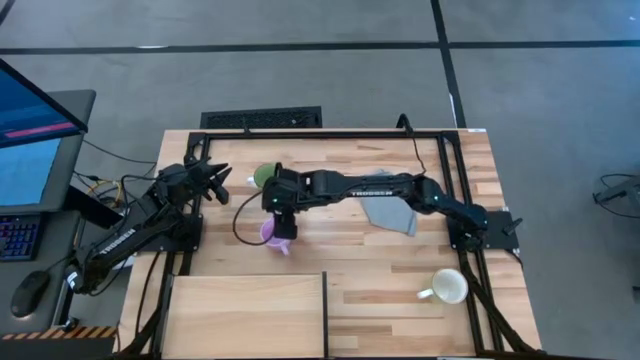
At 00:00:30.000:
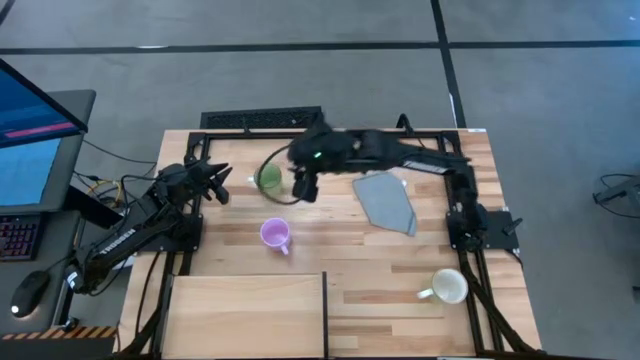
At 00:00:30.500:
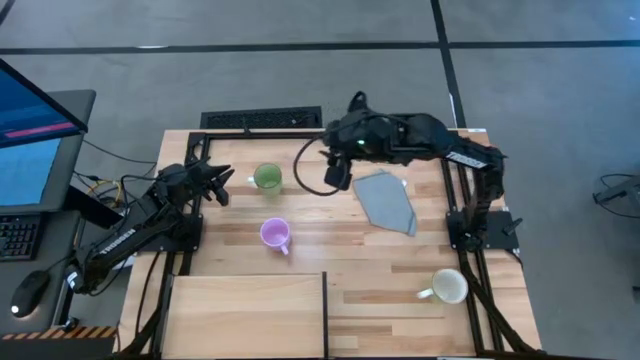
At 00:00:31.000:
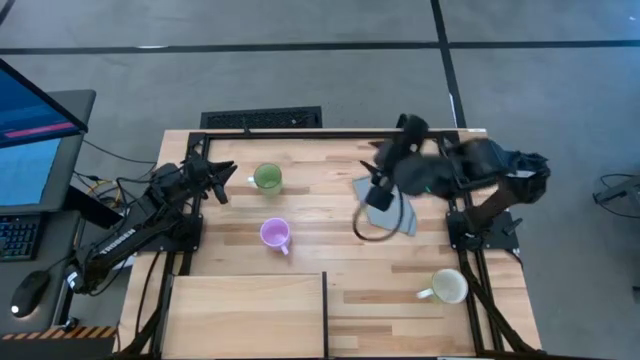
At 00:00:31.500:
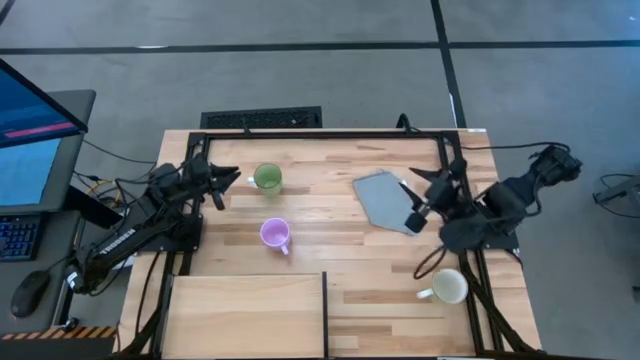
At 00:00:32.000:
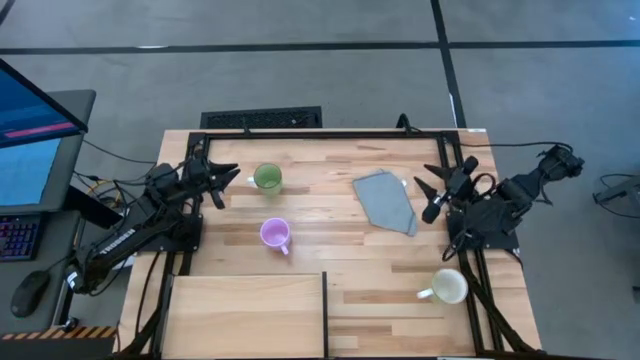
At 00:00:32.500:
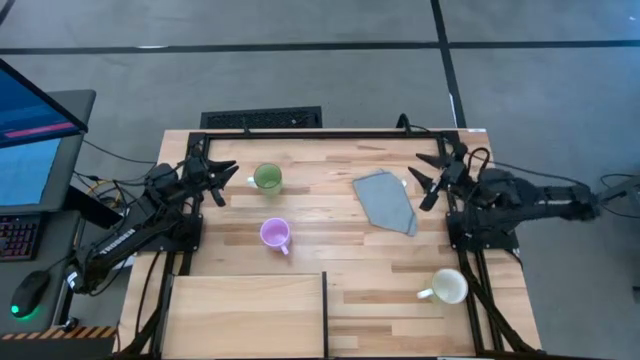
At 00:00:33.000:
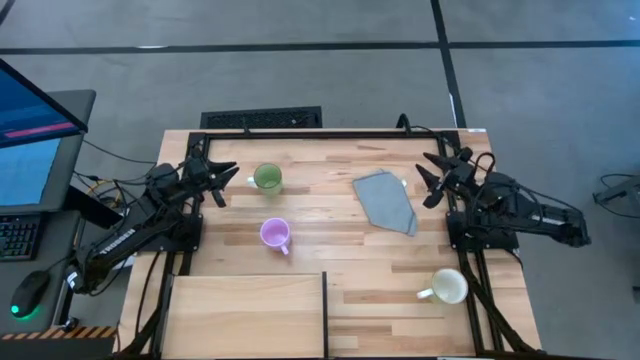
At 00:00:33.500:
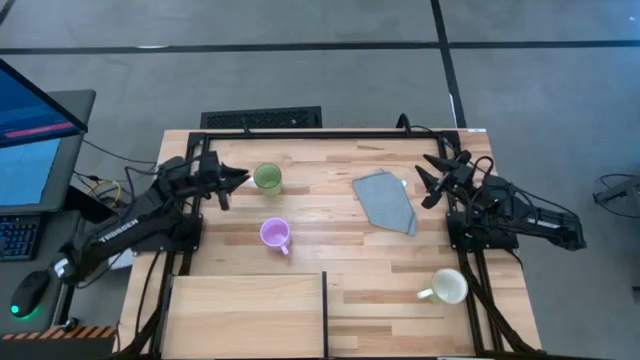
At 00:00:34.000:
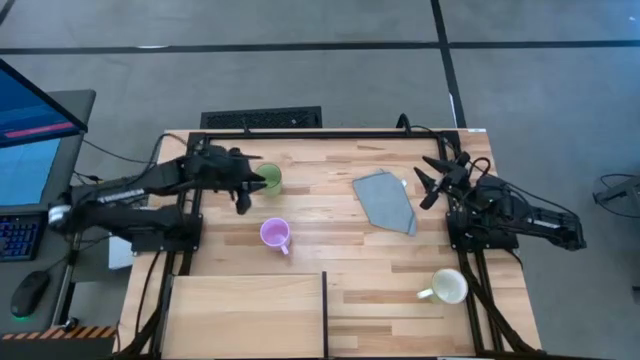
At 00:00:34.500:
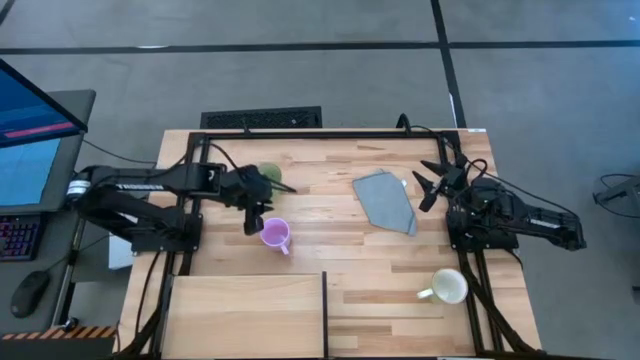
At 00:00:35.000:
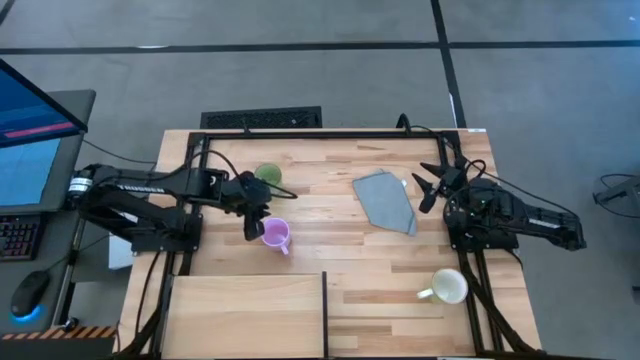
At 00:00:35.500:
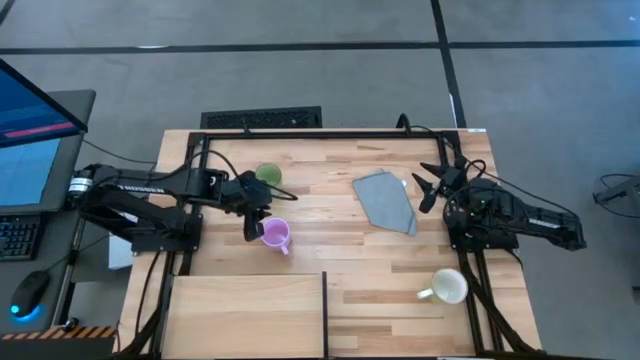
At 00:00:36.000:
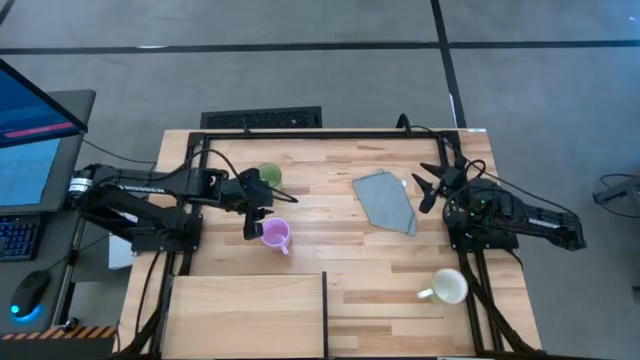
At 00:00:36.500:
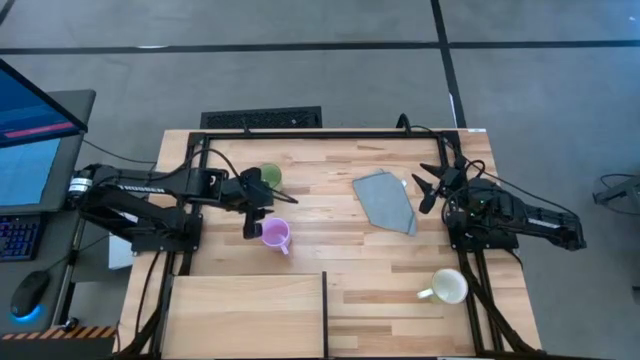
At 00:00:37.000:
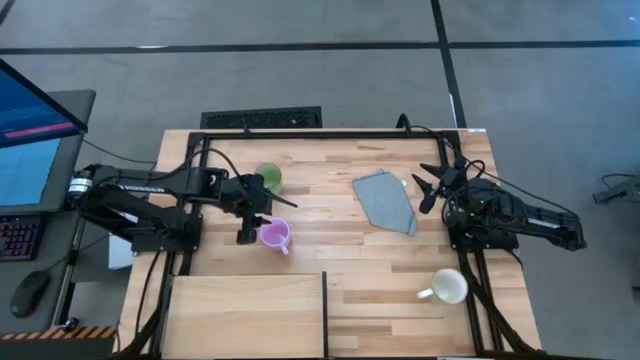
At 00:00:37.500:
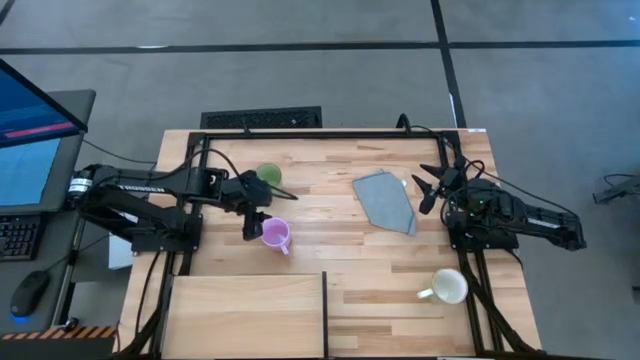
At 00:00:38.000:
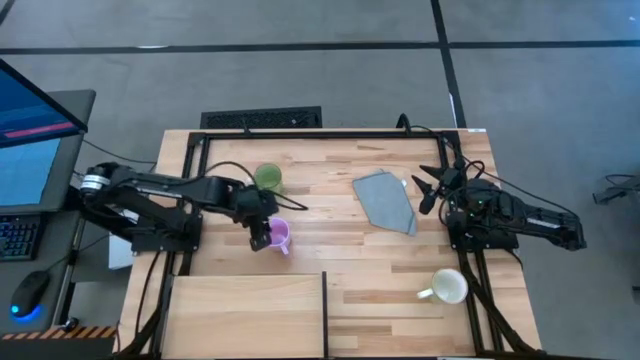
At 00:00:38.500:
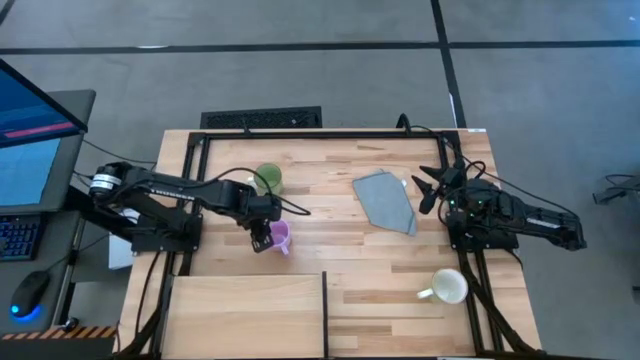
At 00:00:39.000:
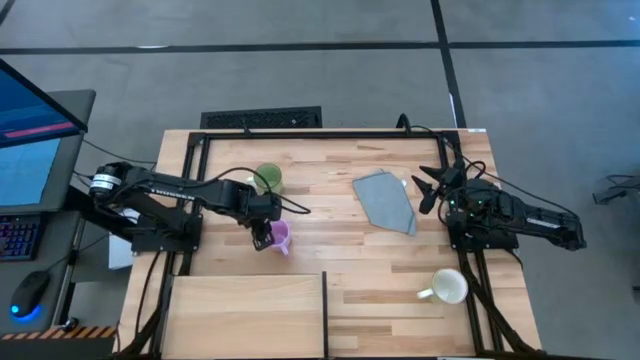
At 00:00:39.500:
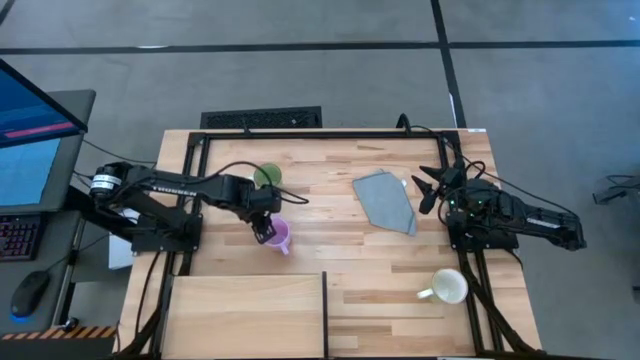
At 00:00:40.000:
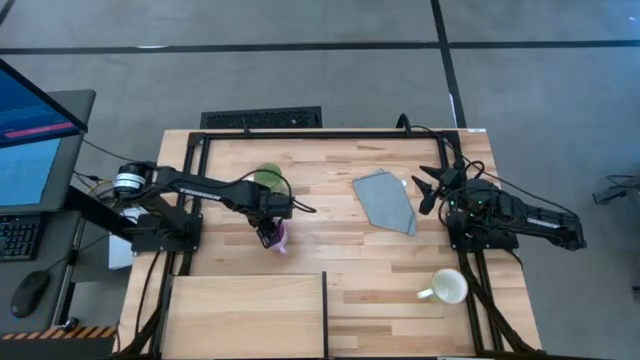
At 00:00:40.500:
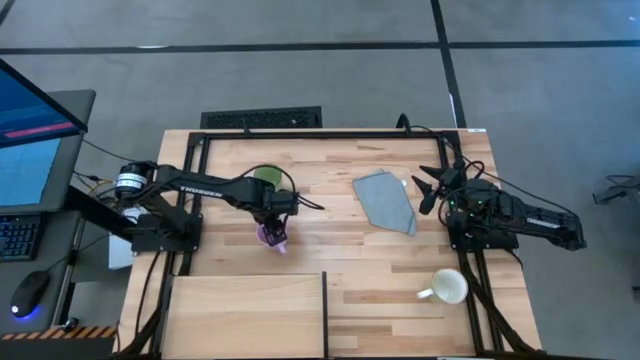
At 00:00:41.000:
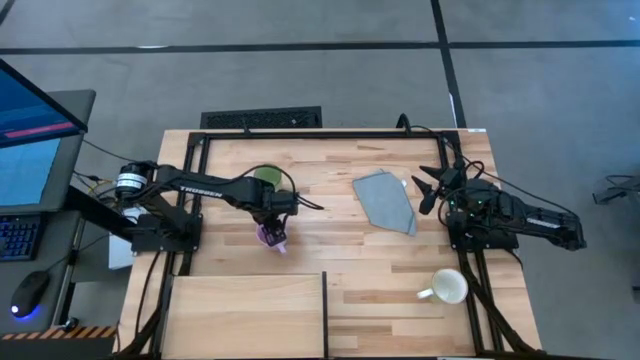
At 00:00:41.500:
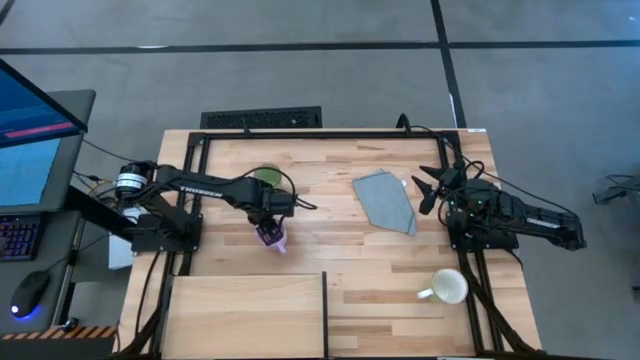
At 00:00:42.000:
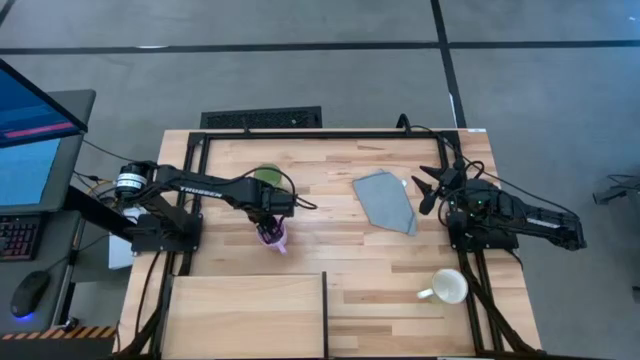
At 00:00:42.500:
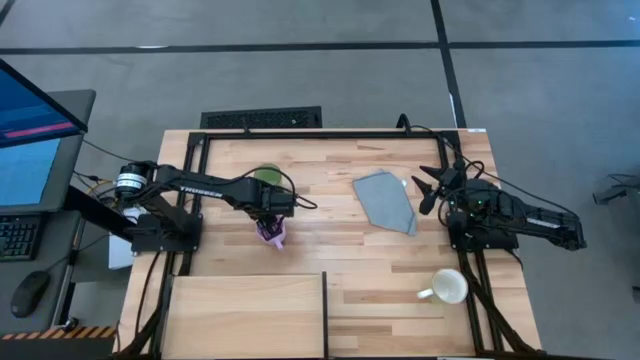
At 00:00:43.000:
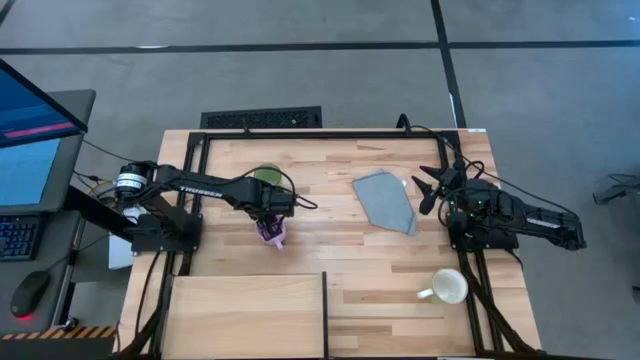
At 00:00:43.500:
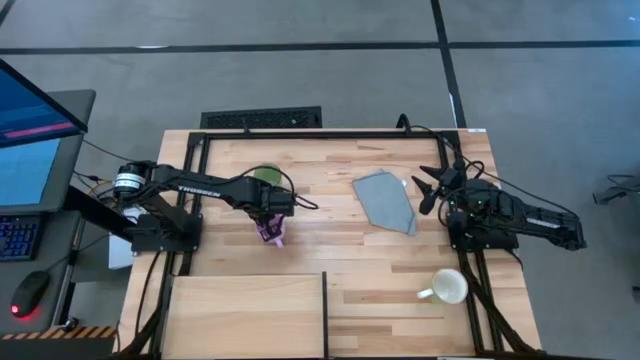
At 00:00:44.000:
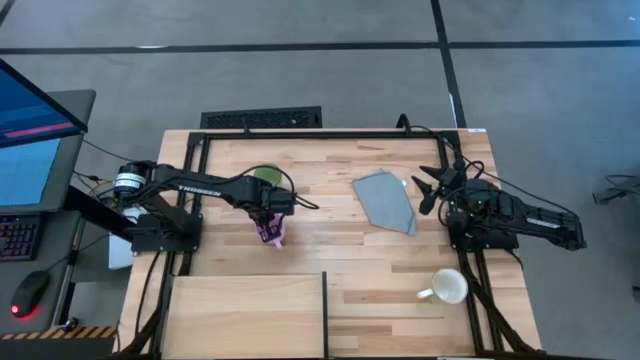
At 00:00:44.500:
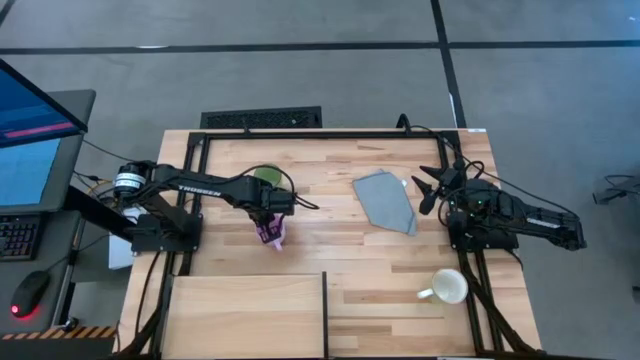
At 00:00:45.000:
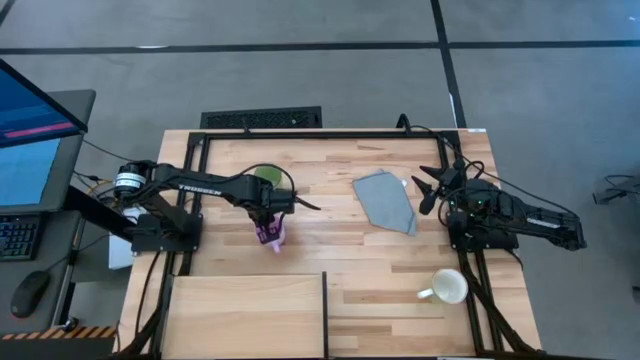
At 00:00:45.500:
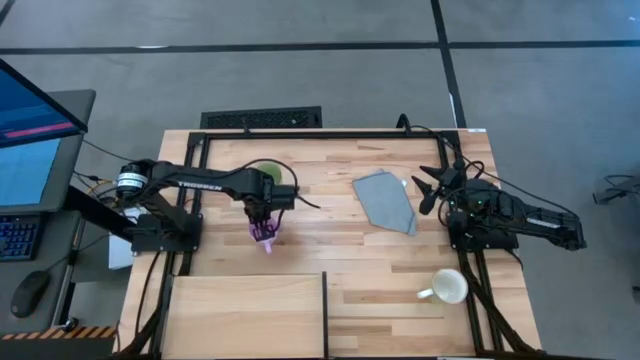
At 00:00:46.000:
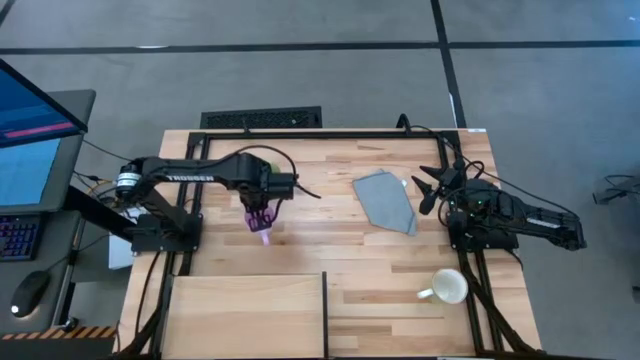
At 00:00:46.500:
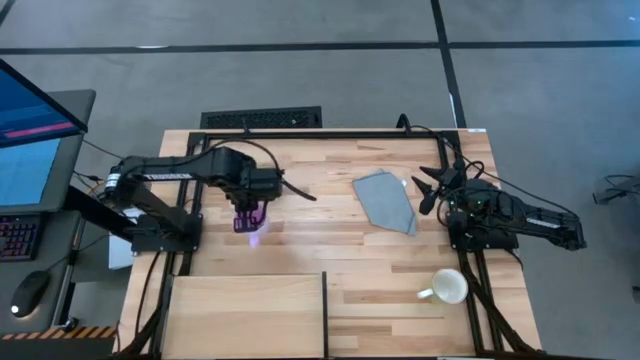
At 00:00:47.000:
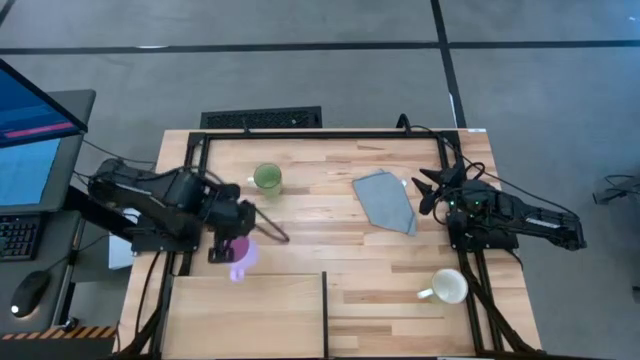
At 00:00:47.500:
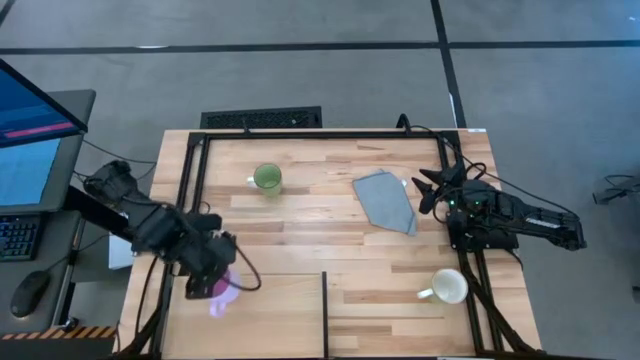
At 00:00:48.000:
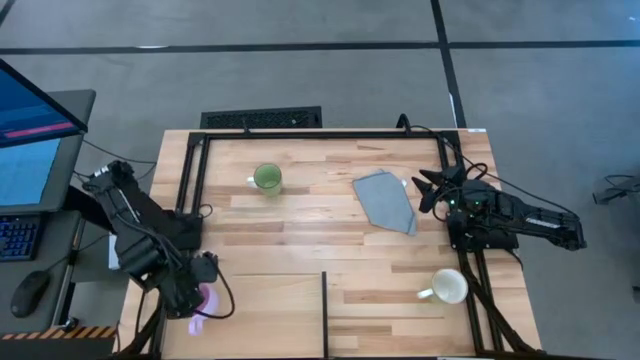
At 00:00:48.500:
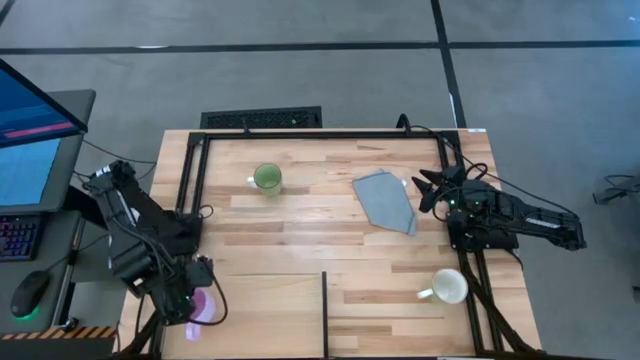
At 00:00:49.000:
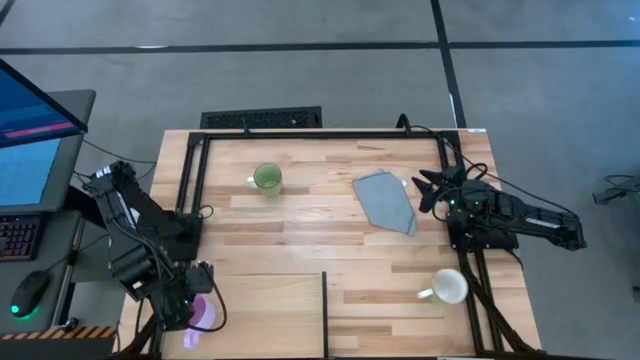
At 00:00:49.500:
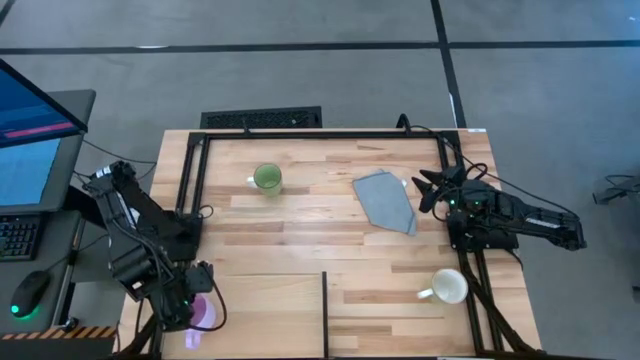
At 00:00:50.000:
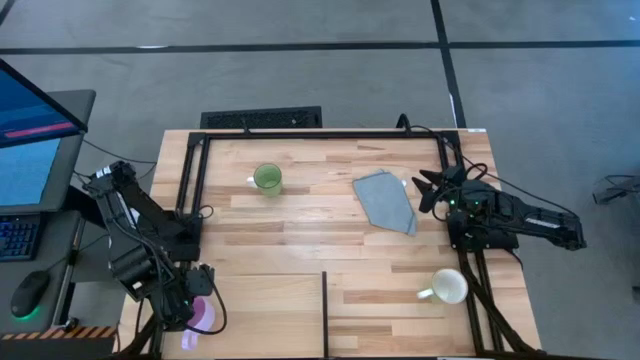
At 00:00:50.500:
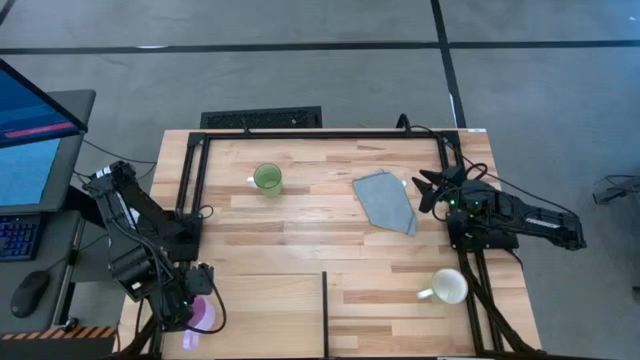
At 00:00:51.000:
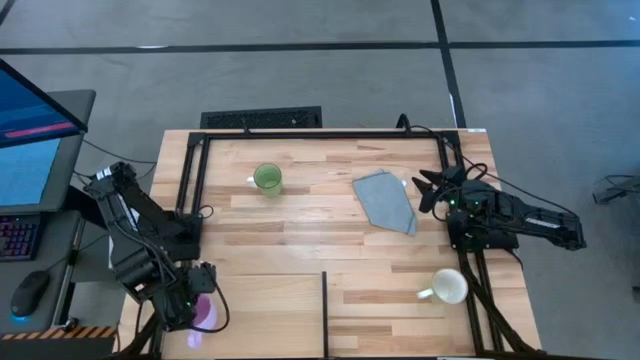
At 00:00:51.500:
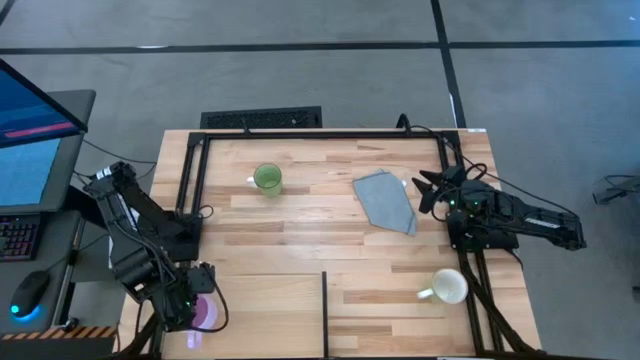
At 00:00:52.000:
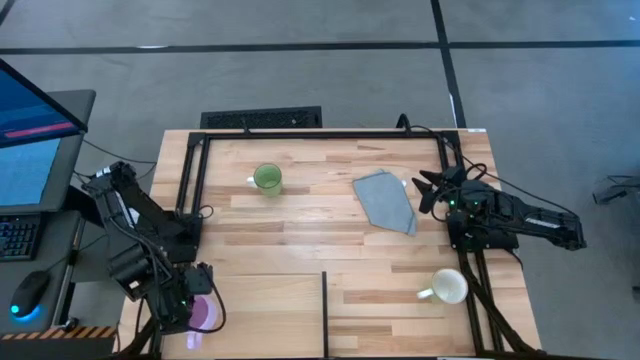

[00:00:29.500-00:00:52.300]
Task: Stack small to large cups/mugs on shelf
Put the purple mug on the shelf
